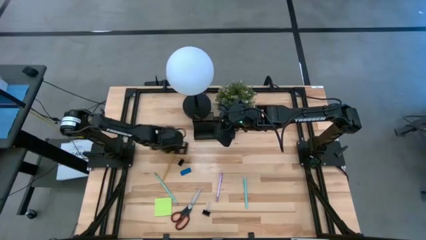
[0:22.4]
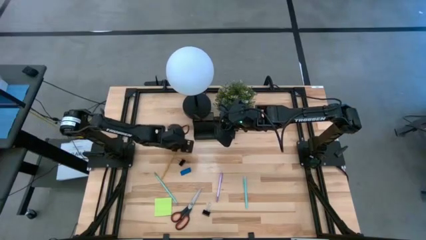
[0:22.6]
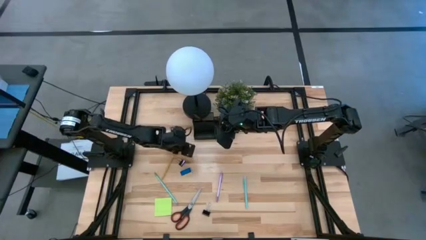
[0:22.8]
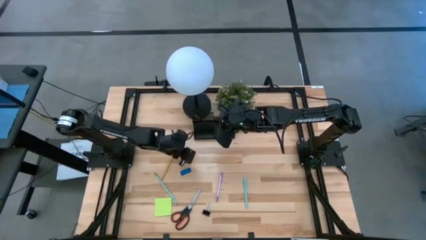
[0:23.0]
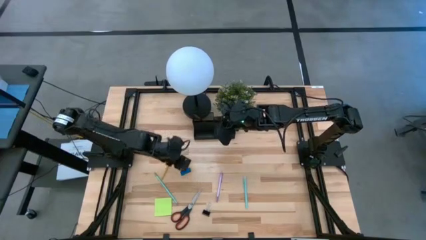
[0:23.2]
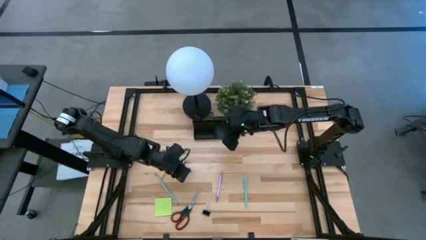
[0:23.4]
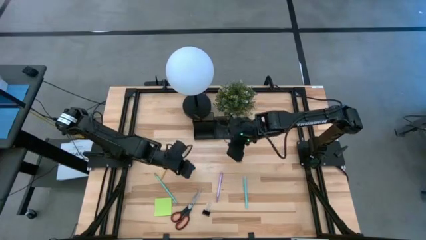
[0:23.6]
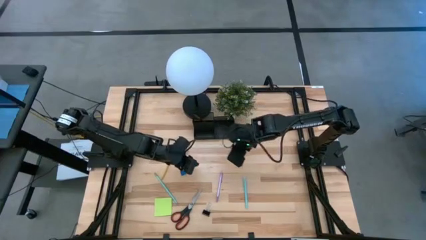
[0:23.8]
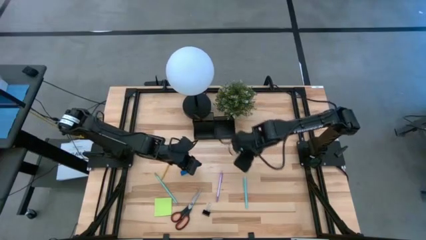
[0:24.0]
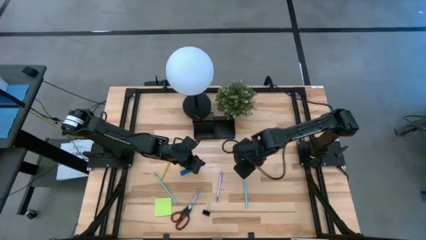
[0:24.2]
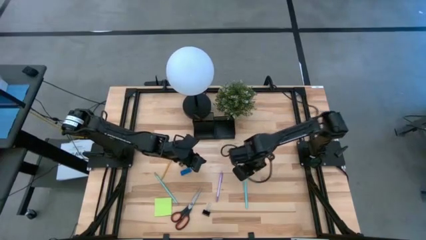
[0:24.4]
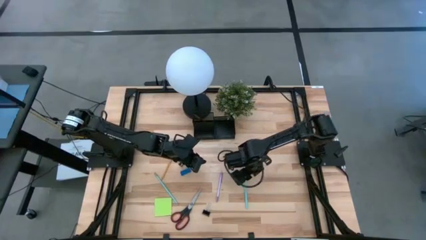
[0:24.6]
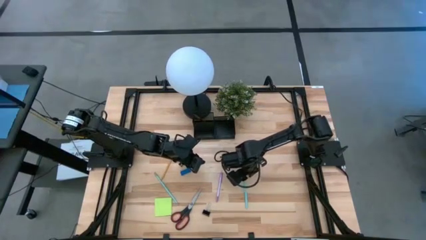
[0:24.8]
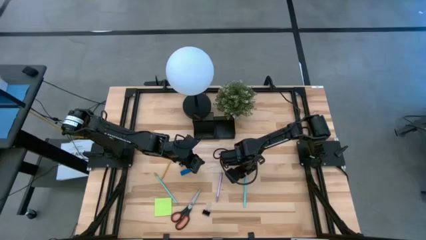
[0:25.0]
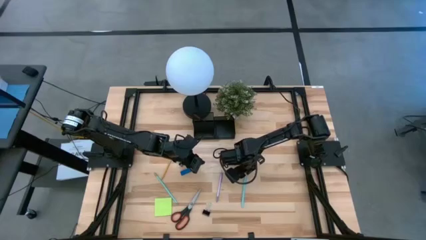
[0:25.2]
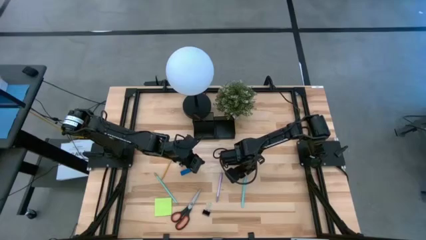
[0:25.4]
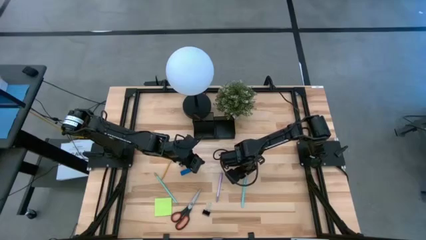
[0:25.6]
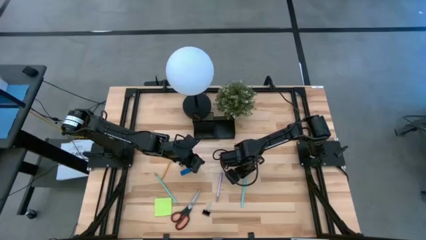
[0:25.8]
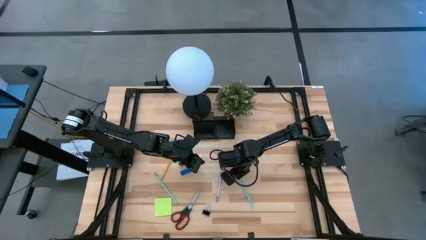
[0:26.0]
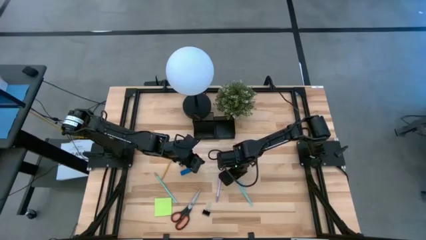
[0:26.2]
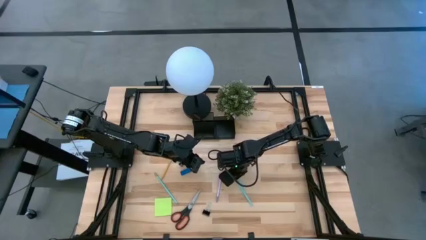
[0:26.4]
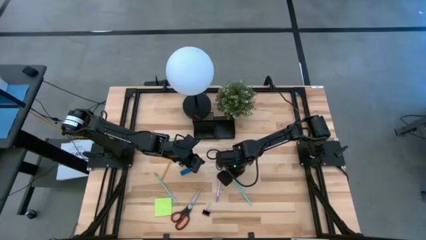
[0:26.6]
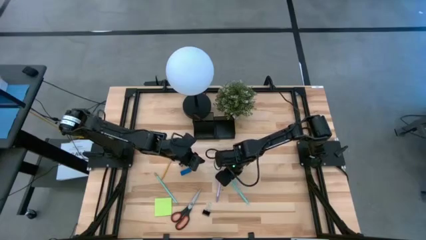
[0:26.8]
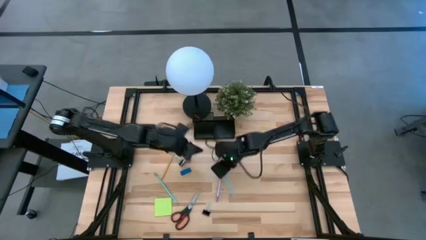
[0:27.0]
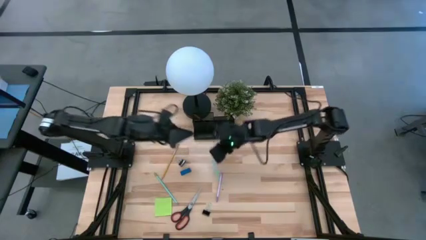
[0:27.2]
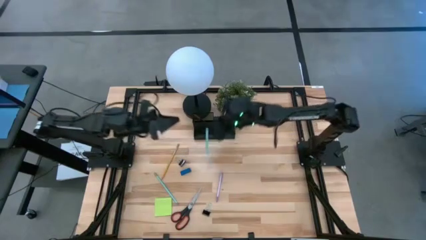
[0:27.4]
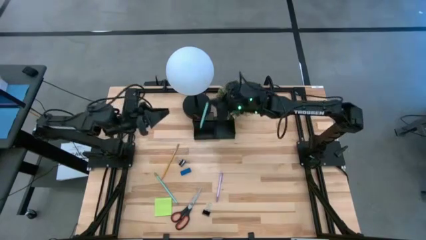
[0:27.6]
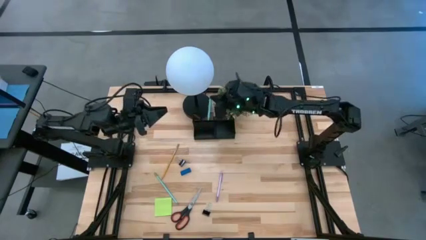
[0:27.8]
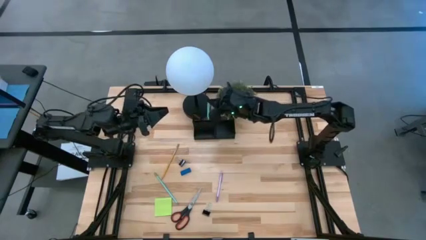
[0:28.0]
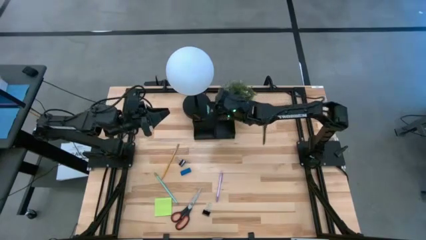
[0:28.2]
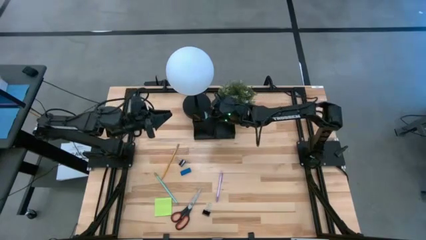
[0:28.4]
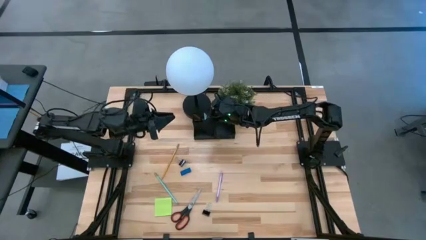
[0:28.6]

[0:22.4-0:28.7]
Task: Pick and place office supplies into organizer
Put the blue pen into the black desk organizer

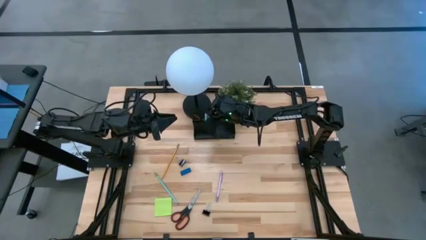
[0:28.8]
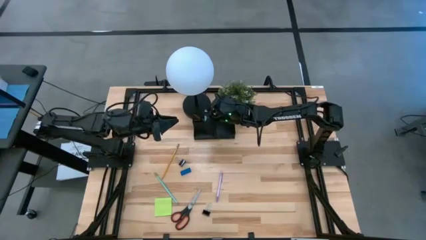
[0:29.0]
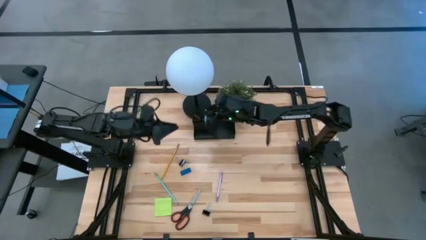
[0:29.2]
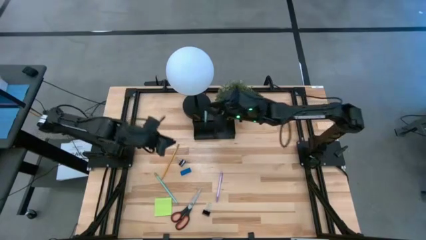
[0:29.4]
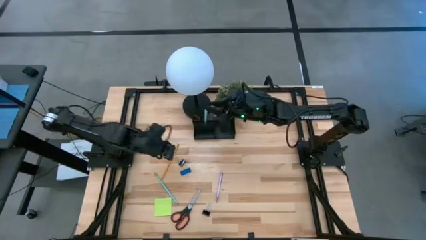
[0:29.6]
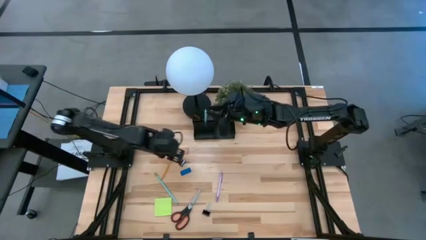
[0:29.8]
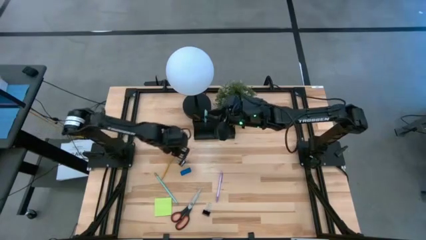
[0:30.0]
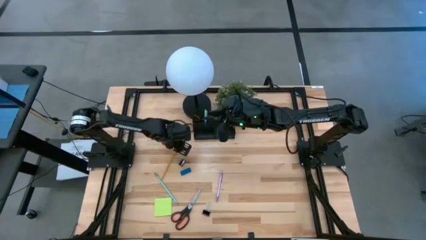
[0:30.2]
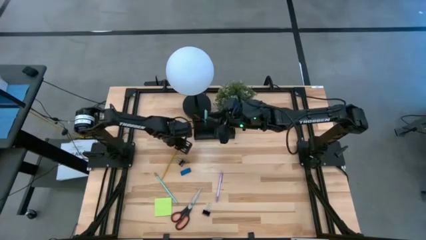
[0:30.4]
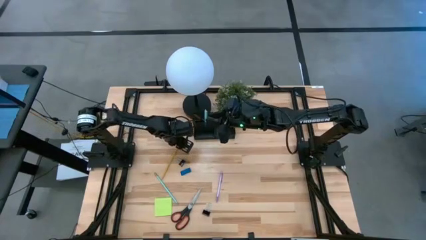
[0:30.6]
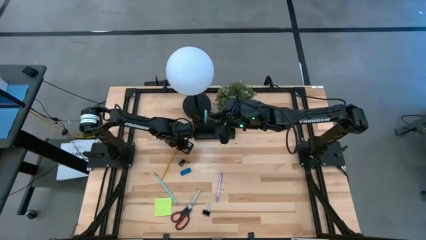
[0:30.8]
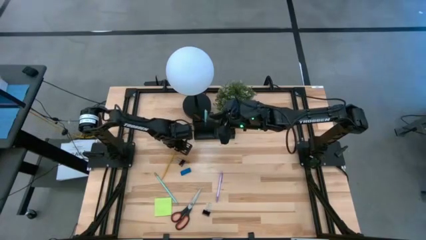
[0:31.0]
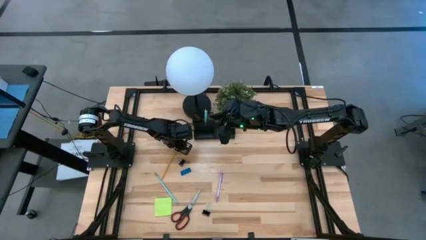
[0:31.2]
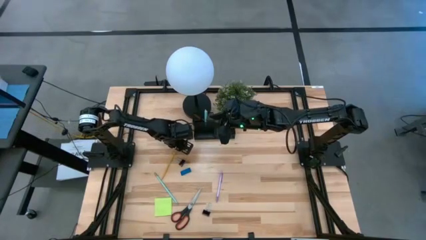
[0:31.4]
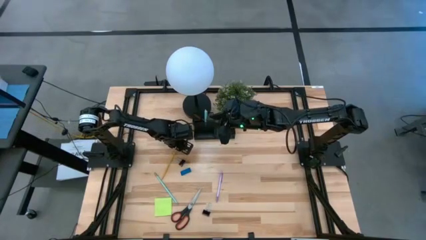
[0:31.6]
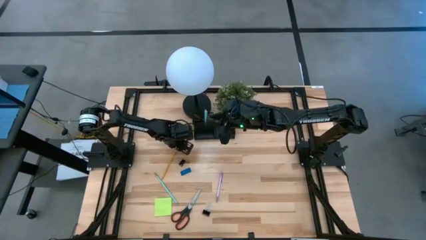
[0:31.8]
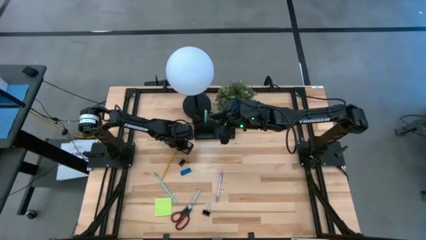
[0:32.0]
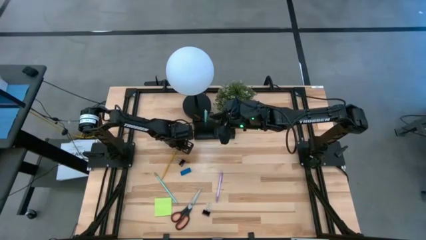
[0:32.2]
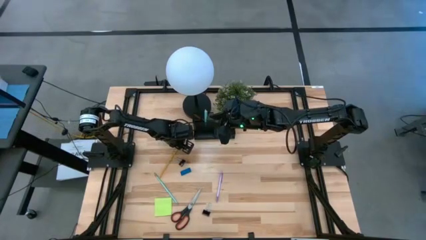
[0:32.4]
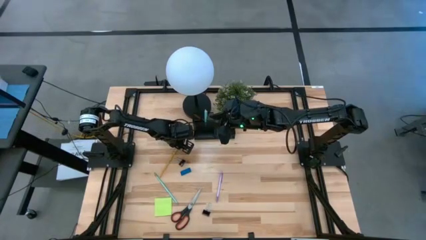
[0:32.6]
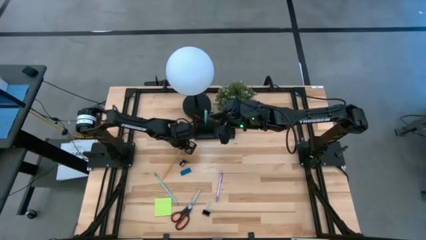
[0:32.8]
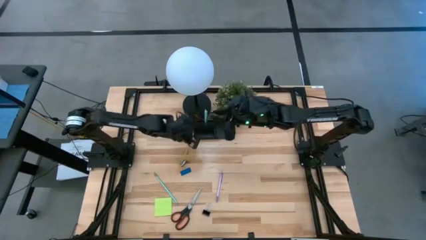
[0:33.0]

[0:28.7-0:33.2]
Put the yellow pencil into the black desk organizer

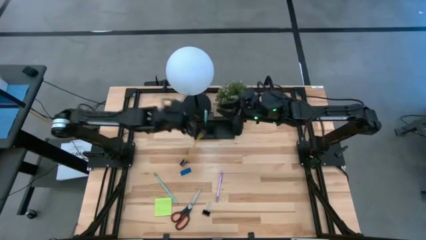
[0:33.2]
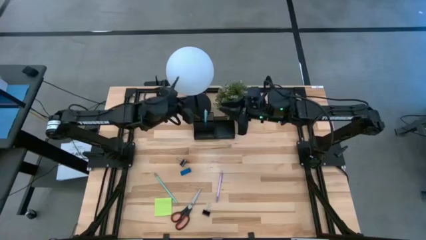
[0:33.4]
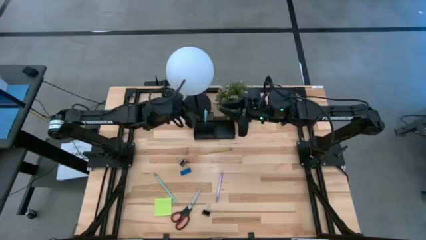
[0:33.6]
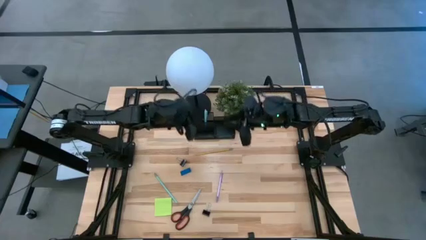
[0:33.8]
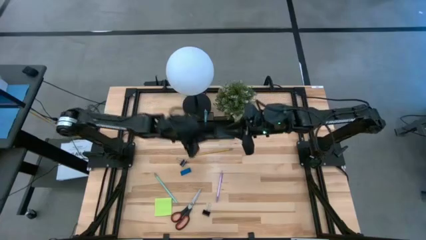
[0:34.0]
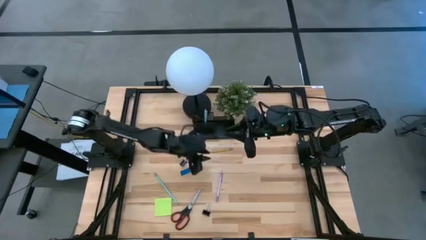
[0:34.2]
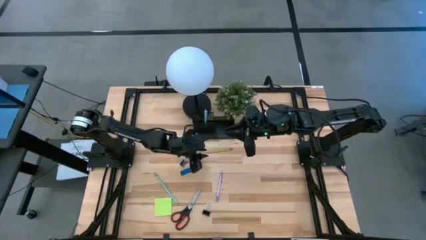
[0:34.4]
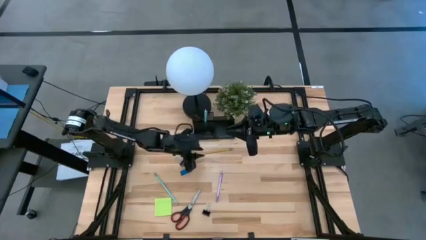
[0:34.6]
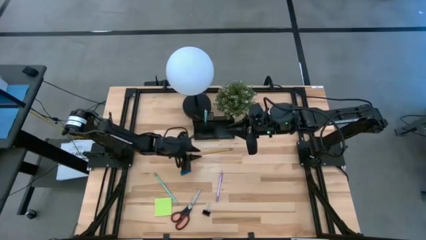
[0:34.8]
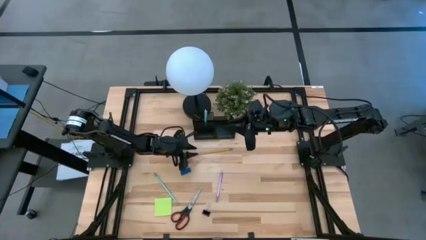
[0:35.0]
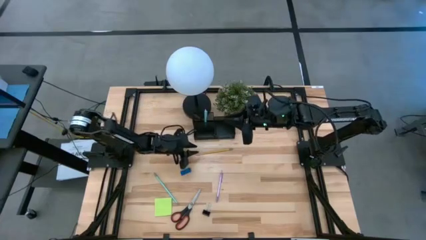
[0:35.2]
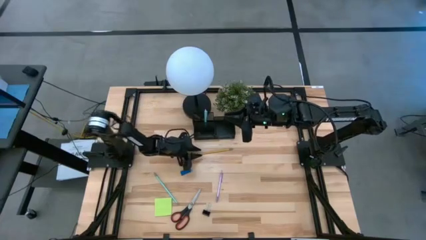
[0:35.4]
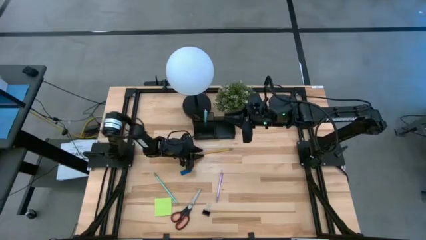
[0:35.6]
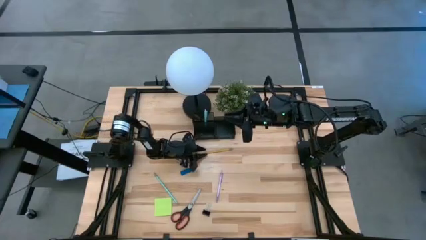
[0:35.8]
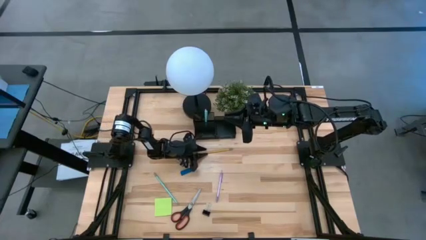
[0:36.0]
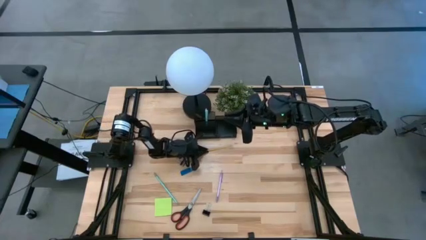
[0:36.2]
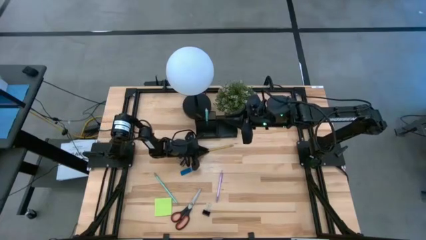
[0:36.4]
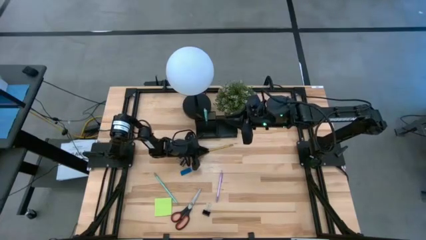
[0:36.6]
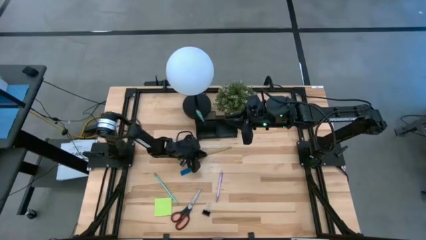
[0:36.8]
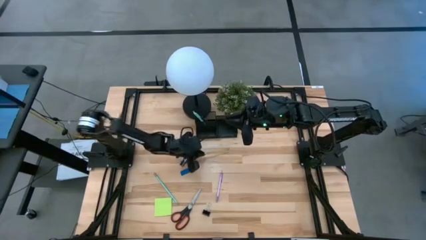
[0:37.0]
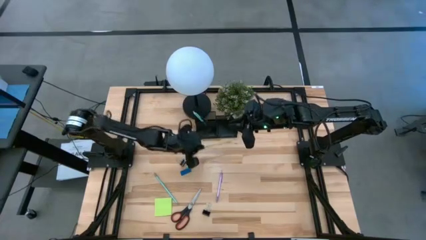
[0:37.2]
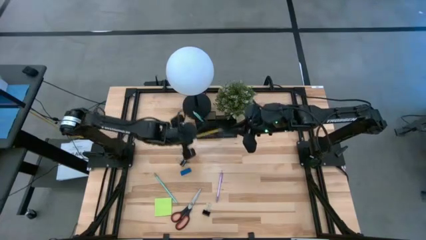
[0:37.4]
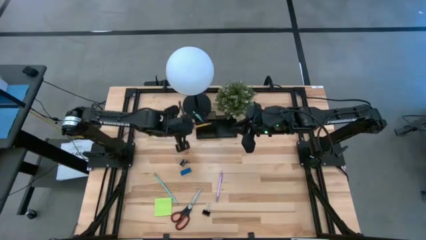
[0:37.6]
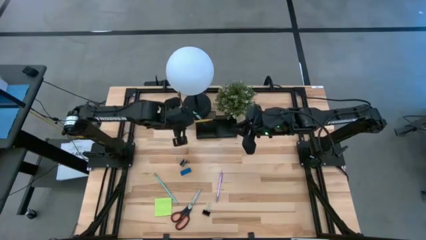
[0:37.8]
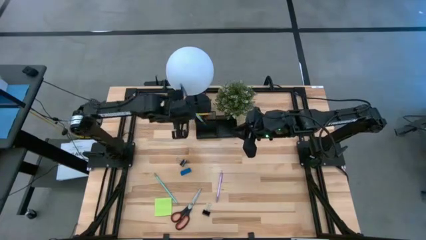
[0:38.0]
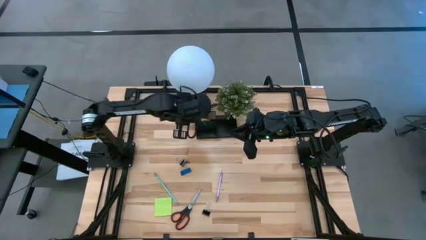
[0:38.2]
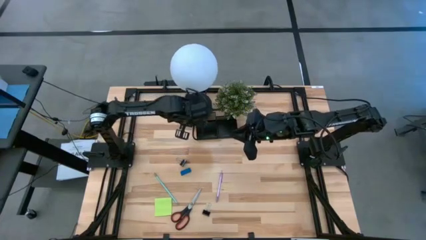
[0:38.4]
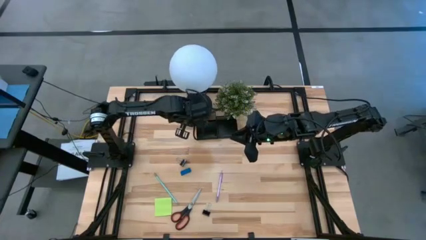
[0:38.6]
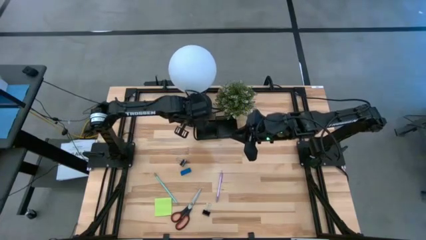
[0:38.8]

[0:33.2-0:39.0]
Put the yellow pencil into the black desk organizer

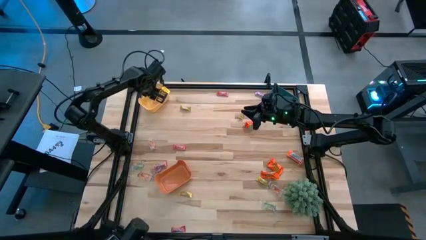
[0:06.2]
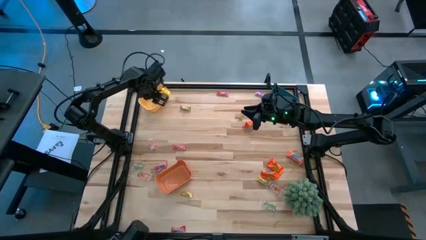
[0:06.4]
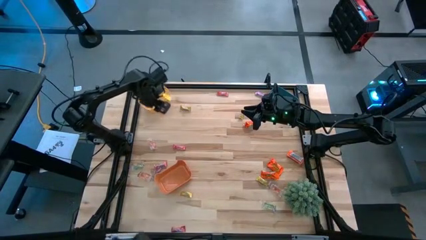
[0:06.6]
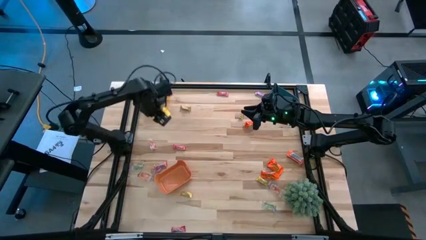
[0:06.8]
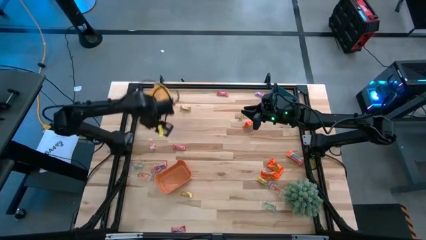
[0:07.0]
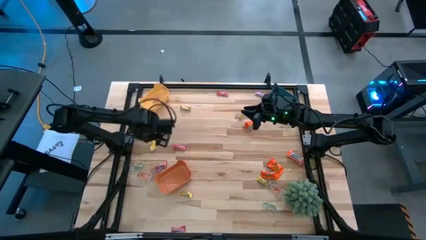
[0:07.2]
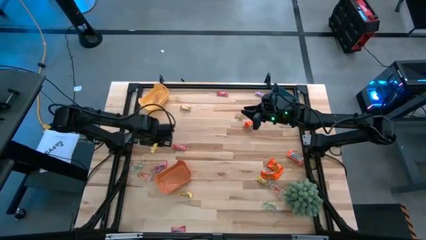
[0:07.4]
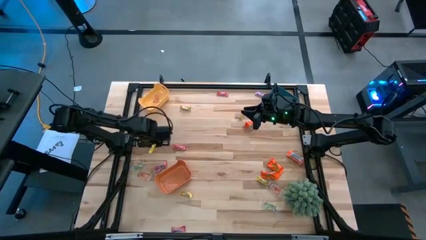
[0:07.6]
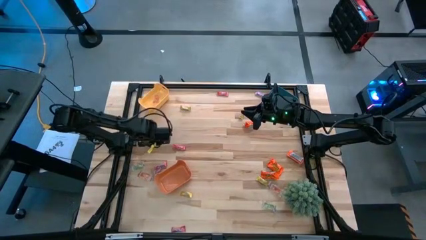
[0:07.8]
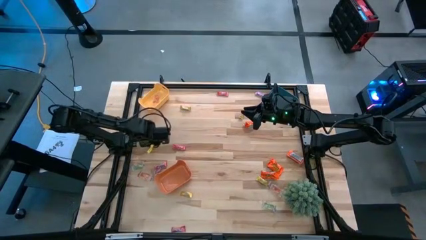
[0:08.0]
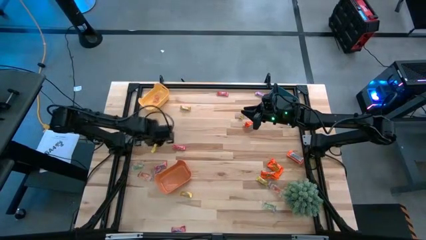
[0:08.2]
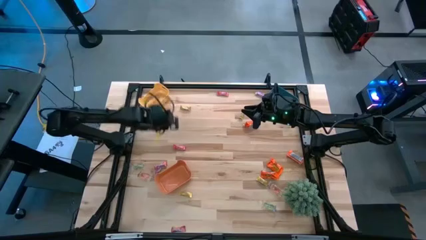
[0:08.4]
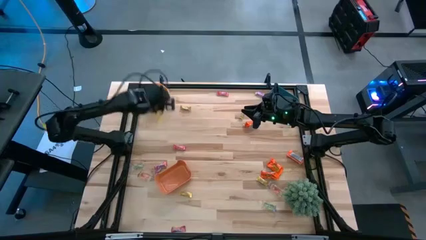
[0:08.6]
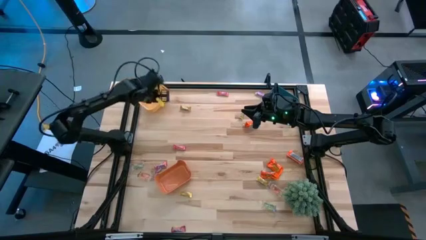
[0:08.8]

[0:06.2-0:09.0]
Task: Sort candy
Put the top left orange gummy into the yellow bin
